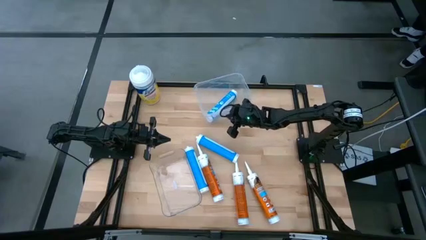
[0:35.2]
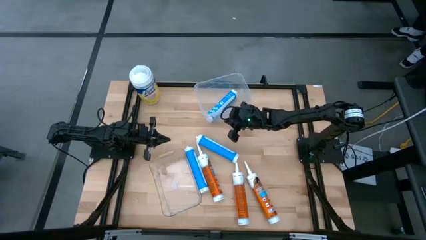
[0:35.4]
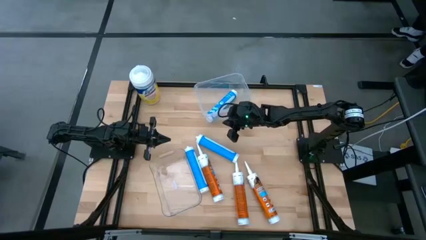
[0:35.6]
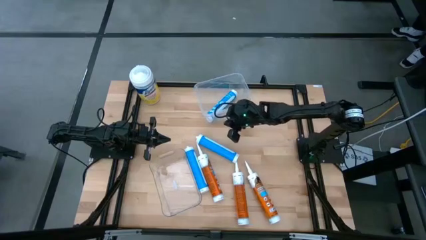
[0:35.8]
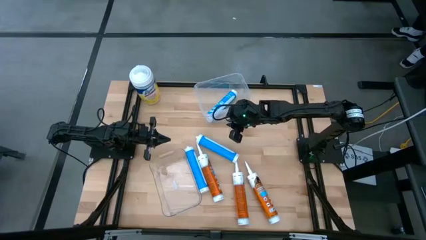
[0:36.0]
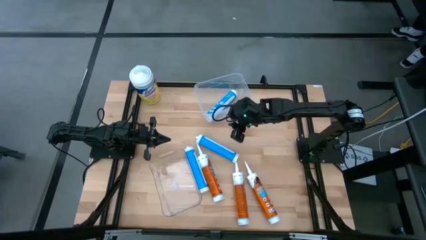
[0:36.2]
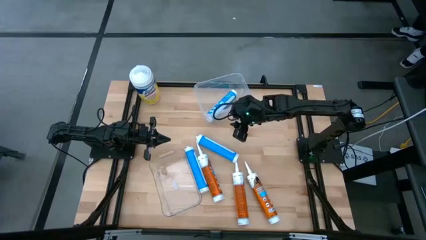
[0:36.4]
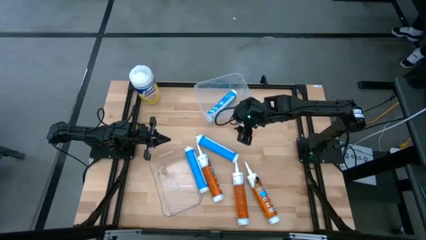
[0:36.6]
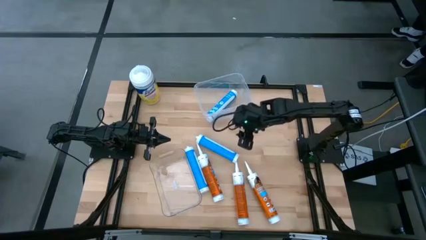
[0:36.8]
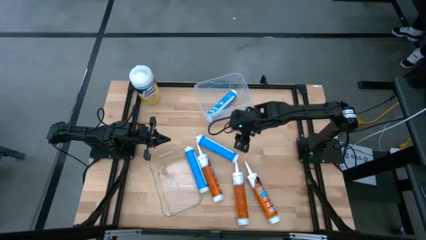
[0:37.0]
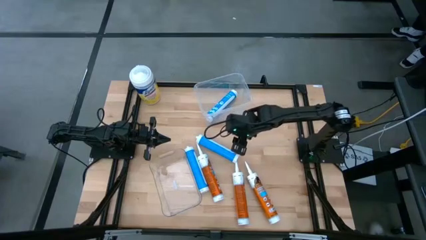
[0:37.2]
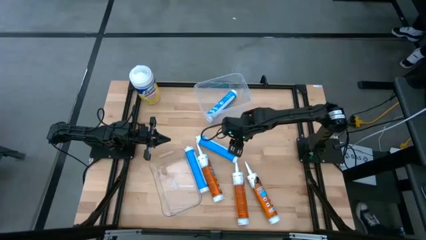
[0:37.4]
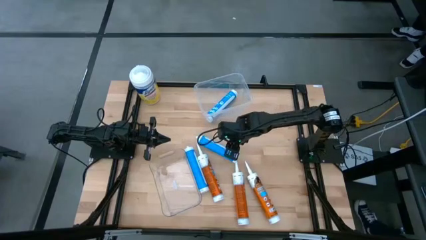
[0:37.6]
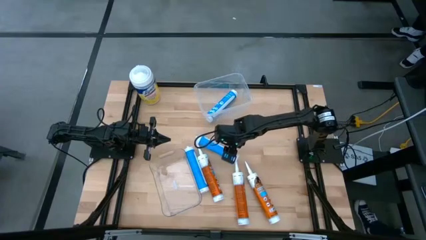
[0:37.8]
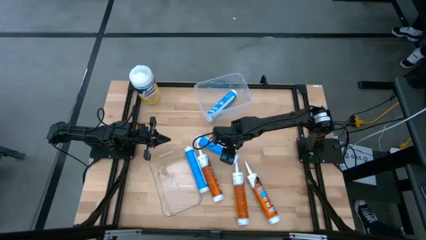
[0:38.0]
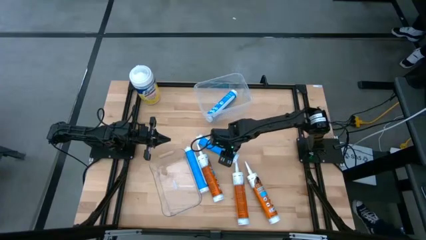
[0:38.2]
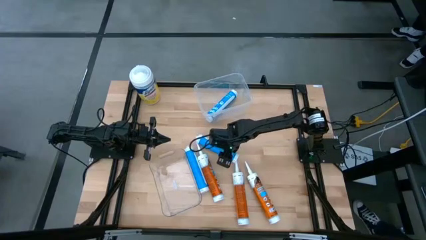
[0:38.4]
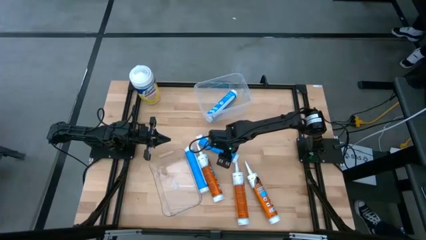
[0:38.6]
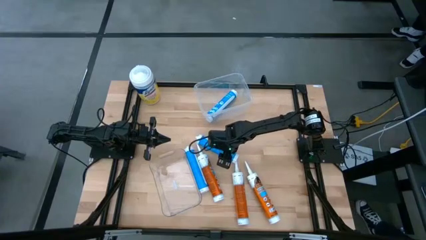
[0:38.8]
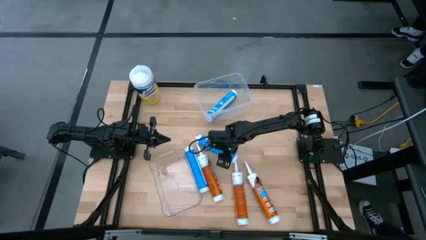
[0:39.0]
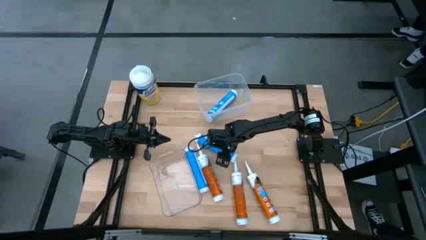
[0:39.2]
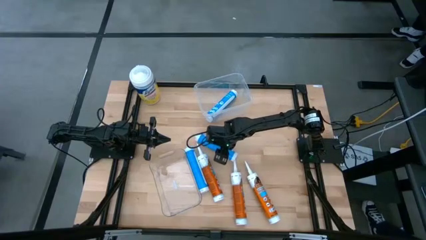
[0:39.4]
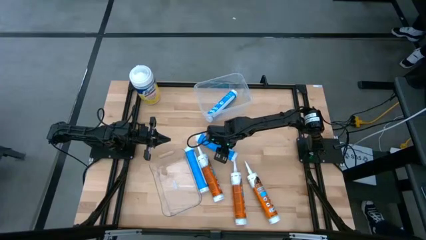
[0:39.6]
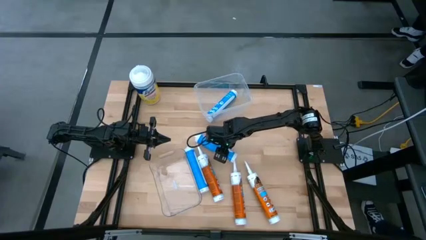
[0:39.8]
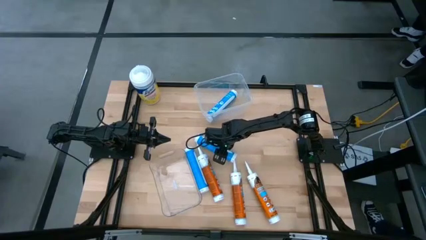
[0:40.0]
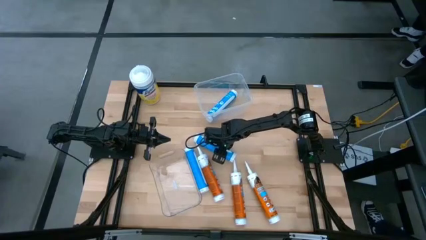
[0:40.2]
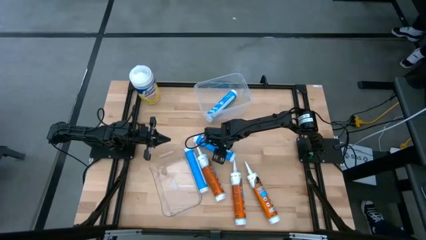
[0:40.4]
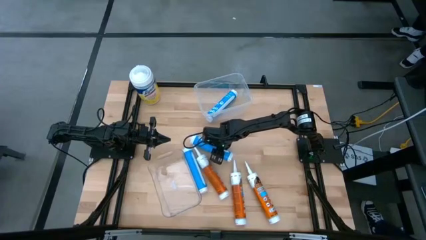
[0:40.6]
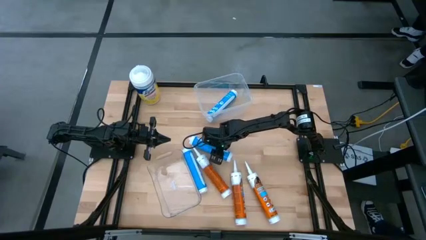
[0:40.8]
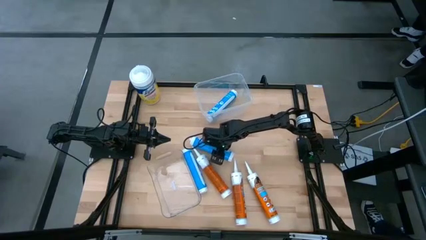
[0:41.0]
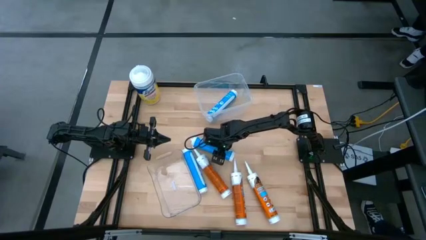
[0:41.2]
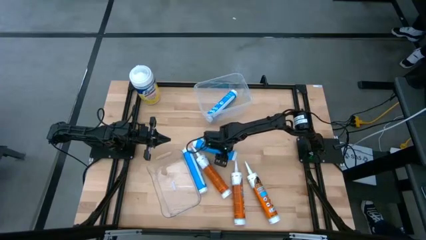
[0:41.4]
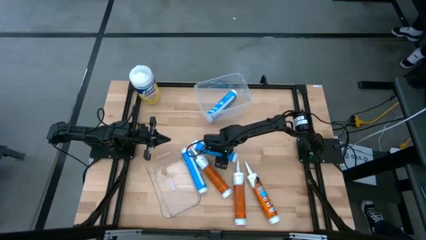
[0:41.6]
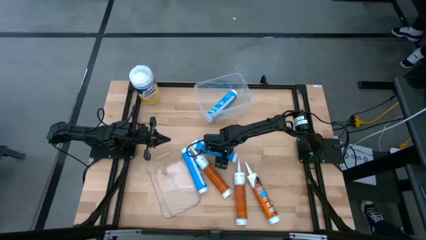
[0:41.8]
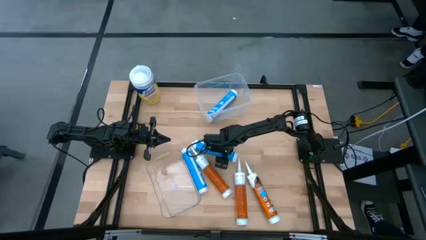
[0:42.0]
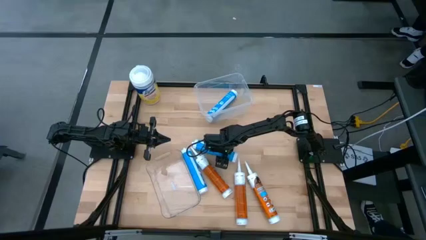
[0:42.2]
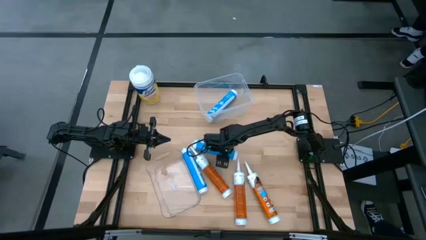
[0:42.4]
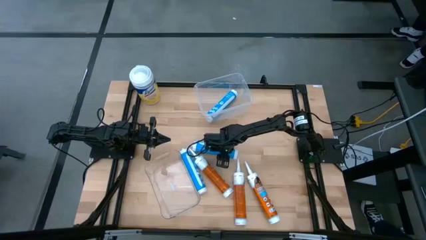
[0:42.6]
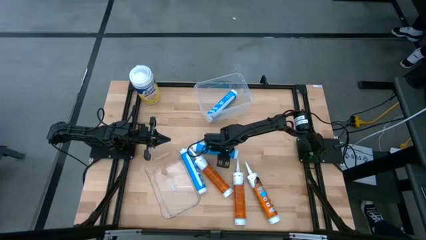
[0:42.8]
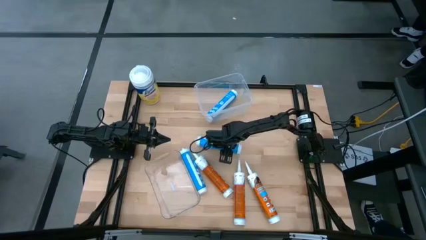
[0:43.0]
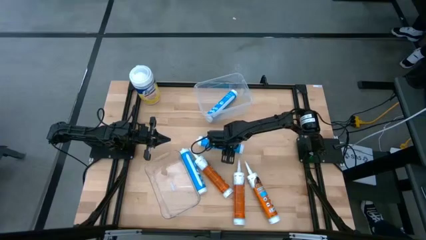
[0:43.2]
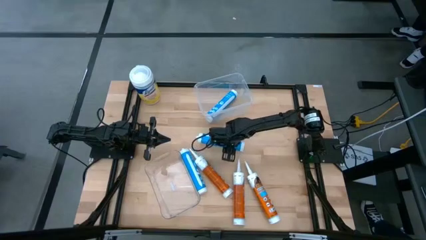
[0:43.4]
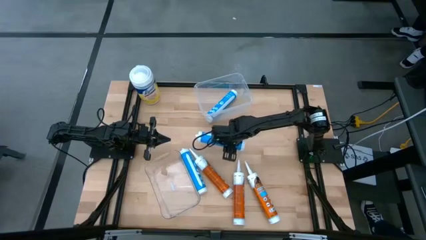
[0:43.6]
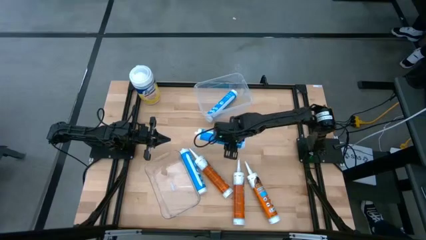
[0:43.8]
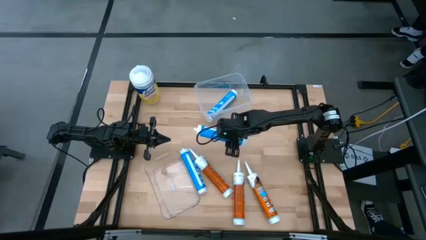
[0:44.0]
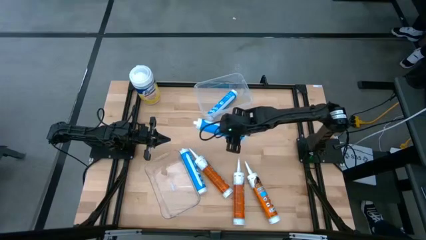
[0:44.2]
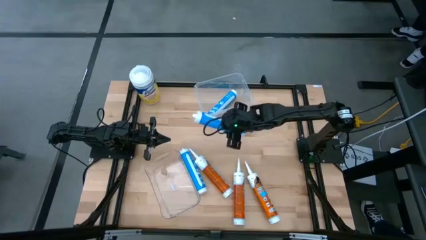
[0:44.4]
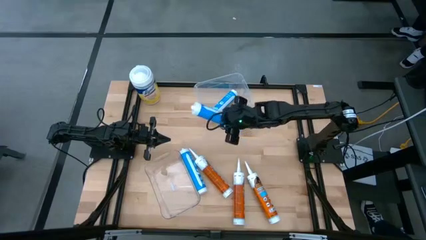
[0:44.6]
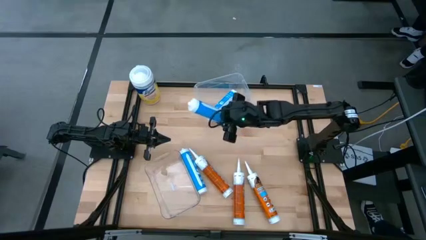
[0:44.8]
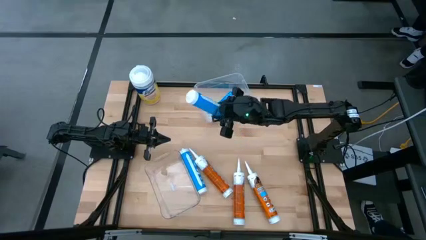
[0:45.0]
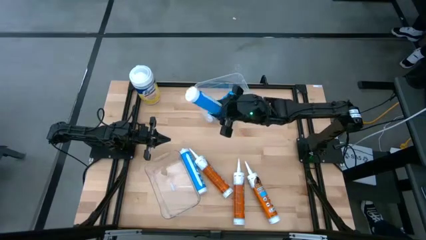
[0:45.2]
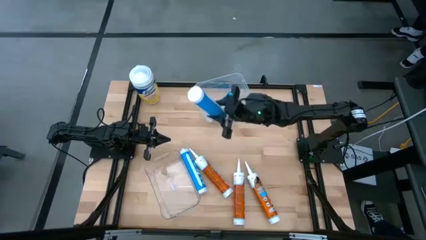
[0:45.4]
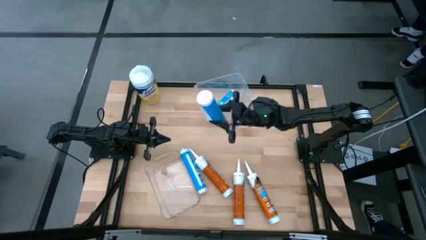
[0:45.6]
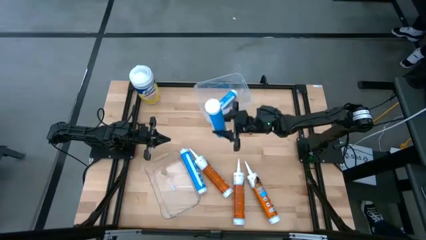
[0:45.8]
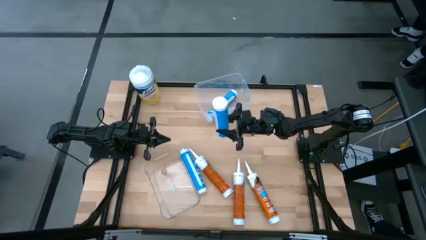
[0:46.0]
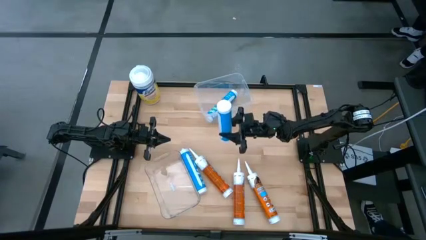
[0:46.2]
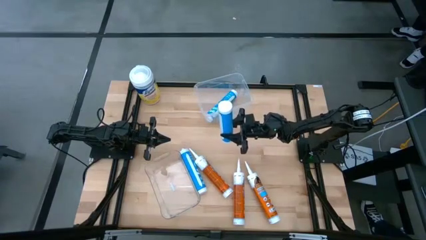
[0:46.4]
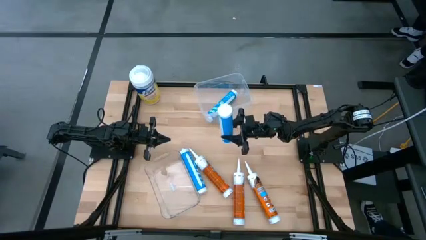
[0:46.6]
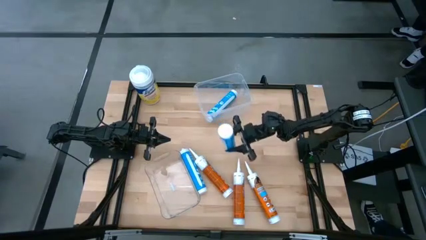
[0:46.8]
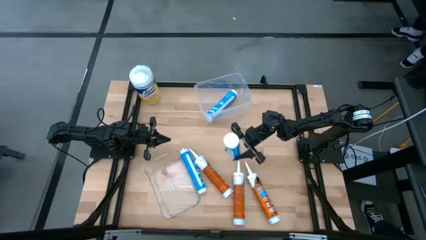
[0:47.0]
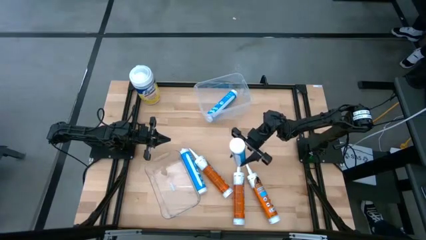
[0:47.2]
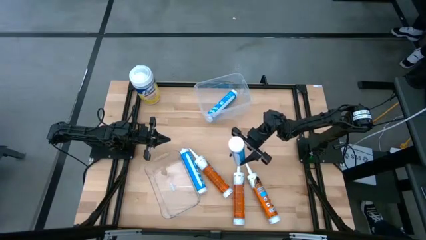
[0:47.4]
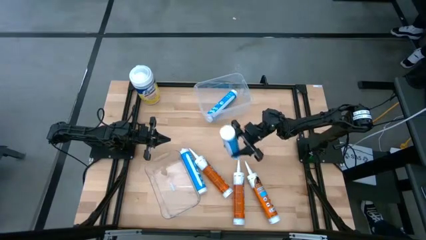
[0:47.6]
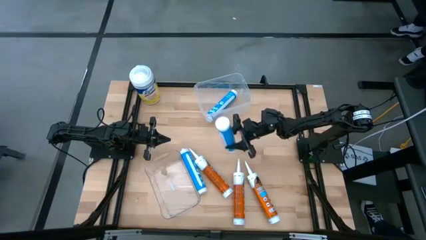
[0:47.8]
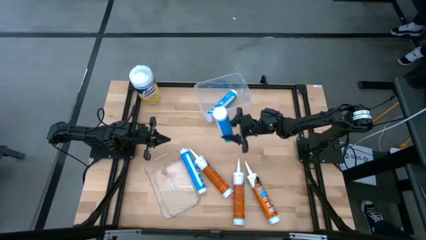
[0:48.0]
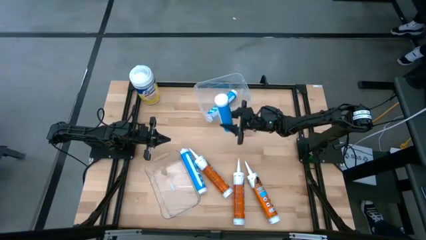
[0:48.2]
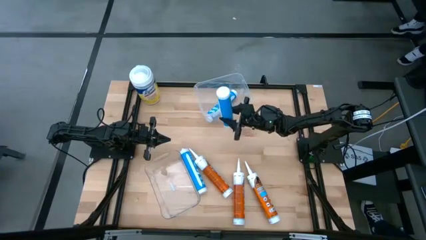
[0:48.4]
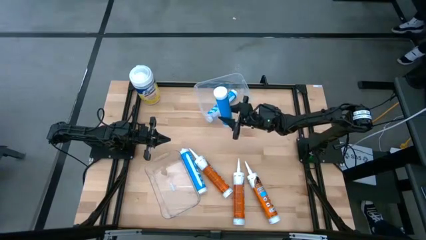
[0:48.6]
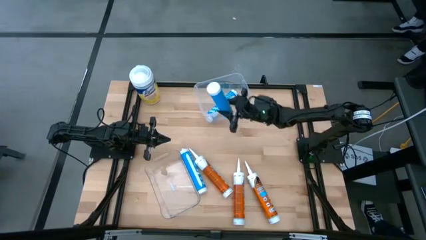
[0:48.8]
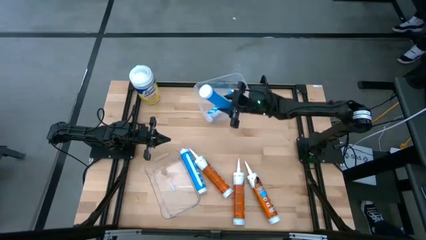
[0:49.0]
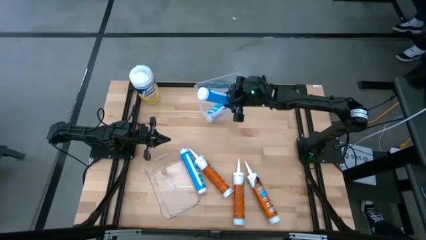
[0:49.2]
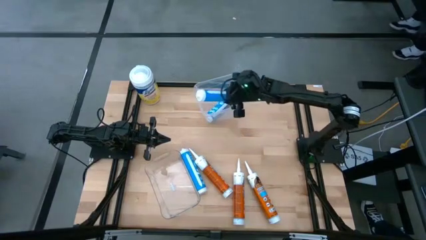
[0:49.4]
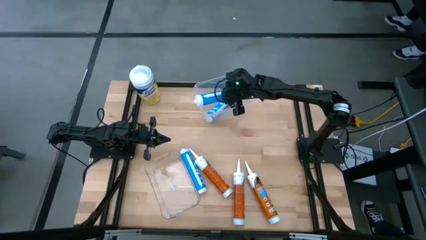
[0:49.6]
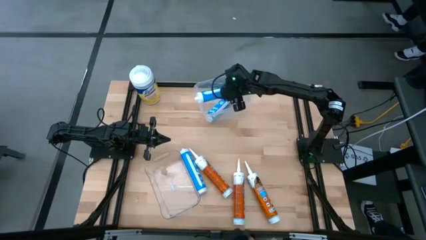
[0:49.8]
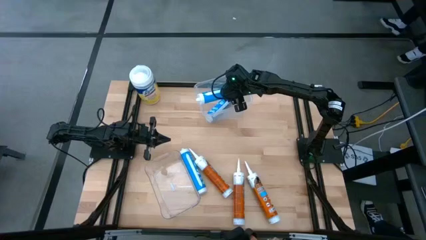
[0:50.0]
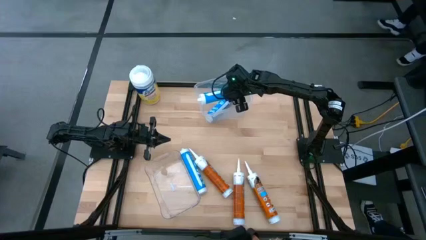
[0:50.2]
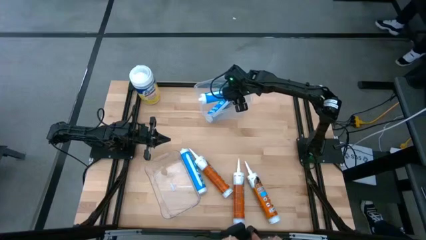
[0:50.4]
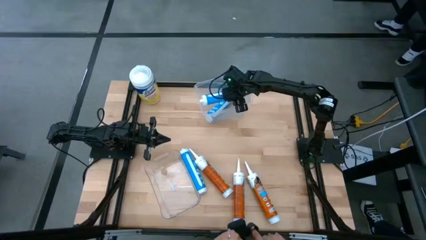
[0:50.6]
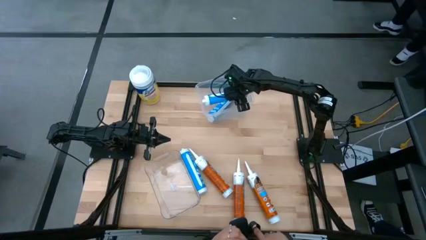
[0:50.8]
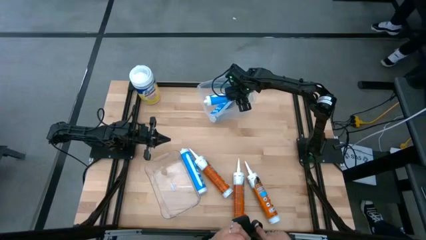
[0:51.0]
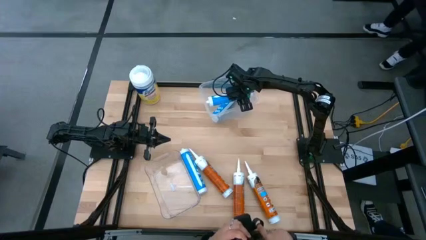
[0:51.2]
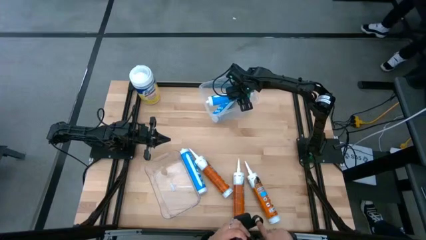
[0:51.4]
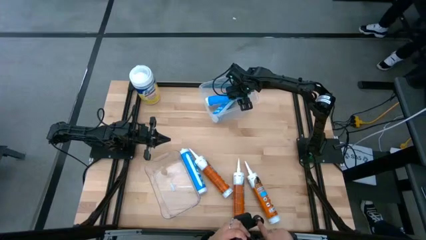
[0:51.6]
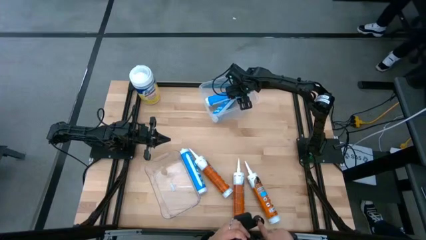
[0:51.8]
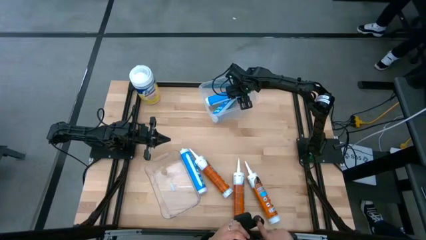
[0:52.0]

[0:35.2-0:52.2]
Task: Pick & place silicon tubes, Sealant and Lysol wipes
Put the top blue sealant into the white bin
